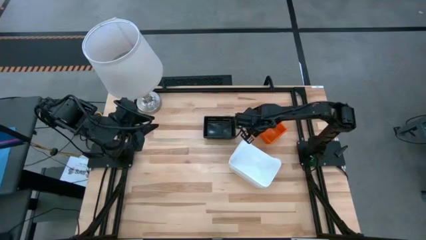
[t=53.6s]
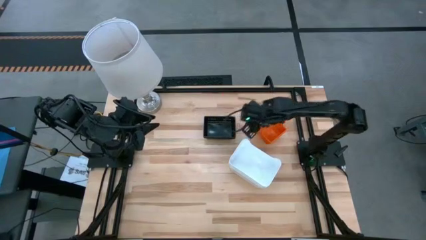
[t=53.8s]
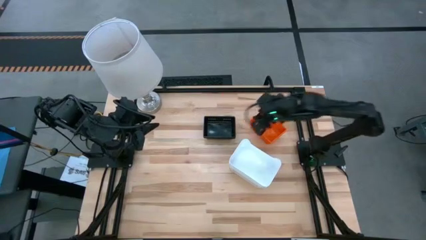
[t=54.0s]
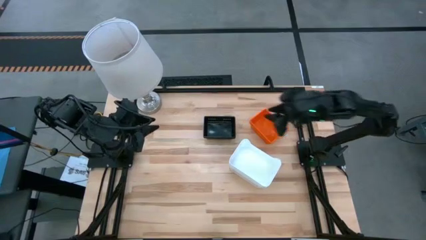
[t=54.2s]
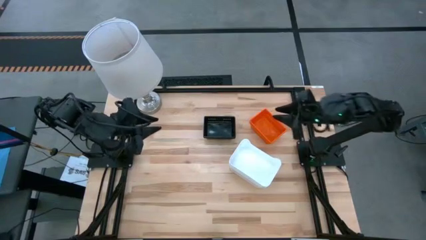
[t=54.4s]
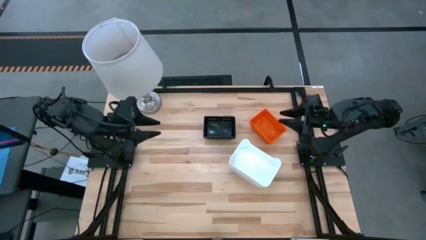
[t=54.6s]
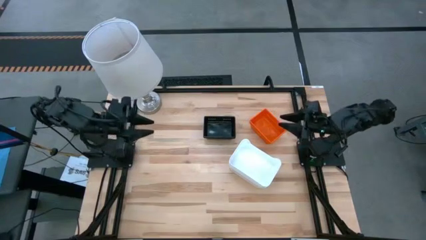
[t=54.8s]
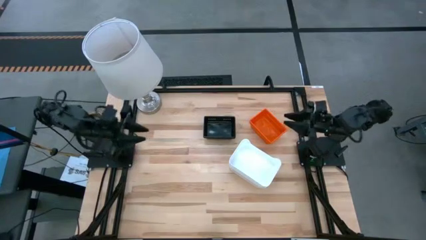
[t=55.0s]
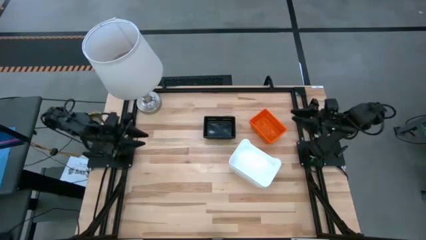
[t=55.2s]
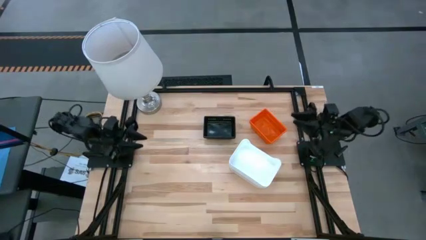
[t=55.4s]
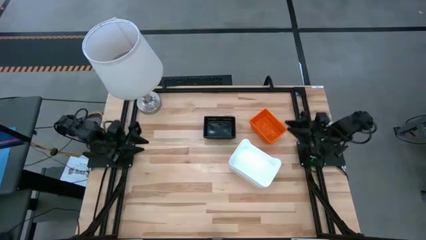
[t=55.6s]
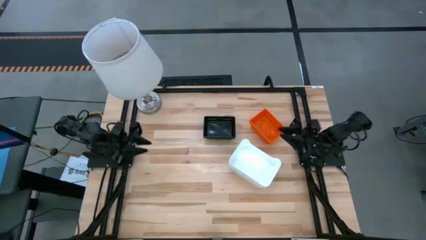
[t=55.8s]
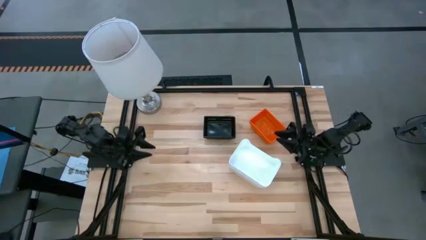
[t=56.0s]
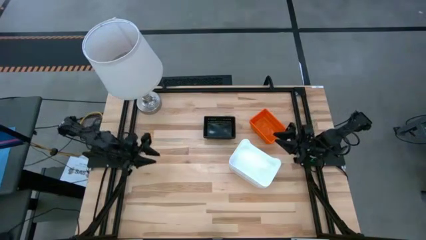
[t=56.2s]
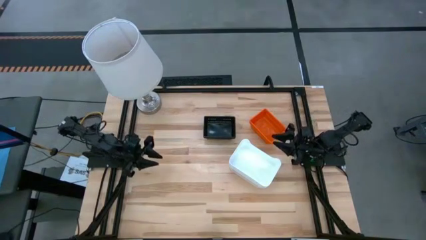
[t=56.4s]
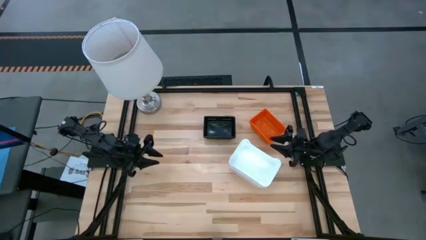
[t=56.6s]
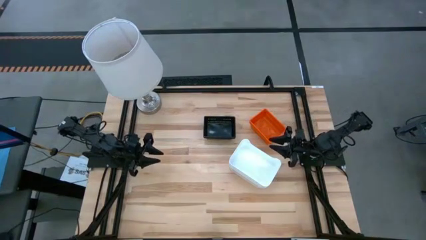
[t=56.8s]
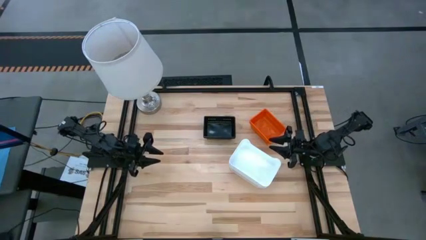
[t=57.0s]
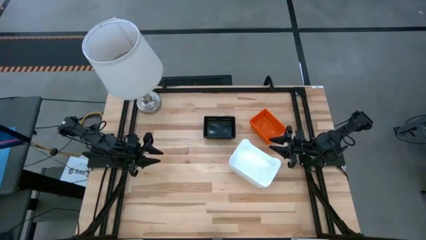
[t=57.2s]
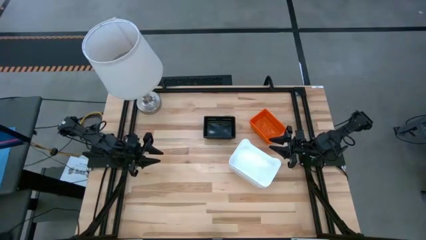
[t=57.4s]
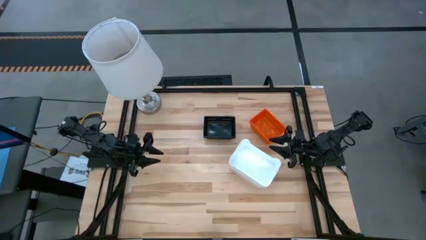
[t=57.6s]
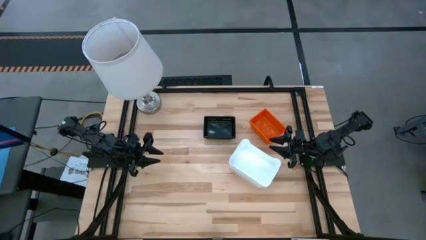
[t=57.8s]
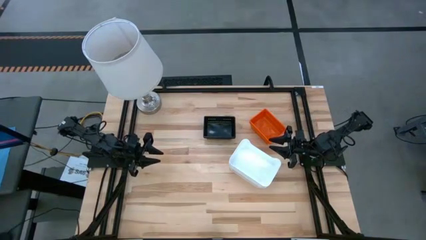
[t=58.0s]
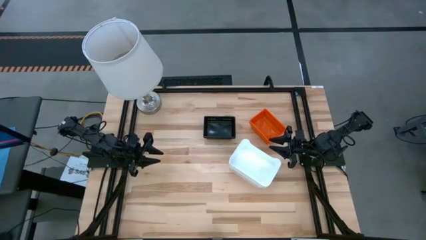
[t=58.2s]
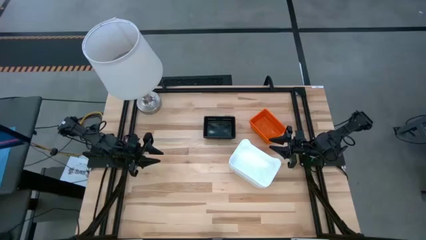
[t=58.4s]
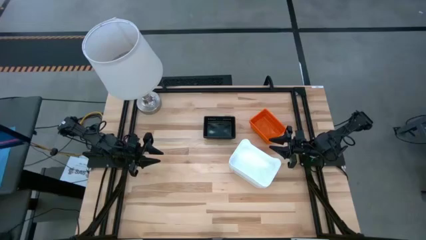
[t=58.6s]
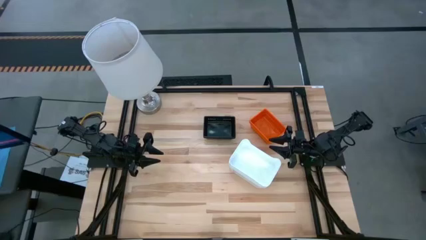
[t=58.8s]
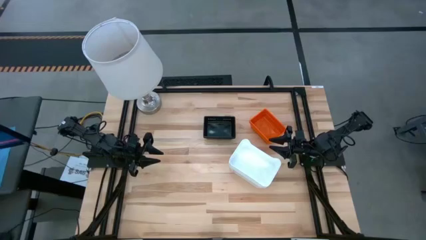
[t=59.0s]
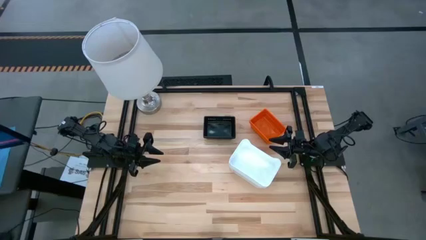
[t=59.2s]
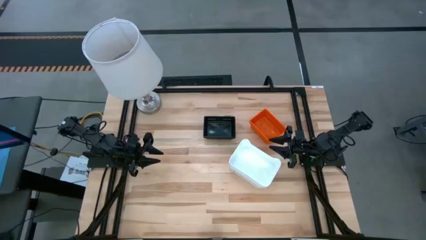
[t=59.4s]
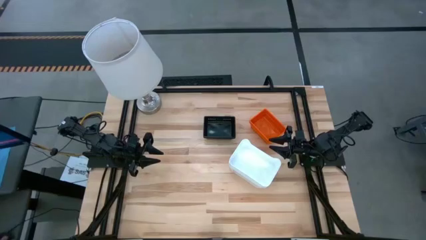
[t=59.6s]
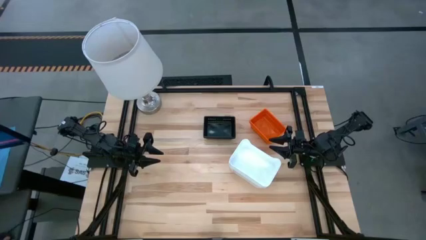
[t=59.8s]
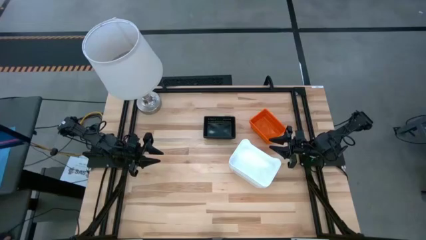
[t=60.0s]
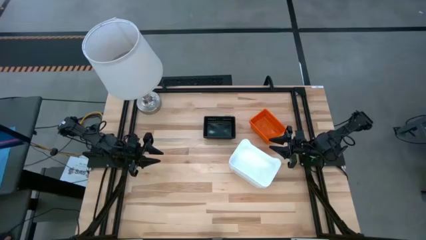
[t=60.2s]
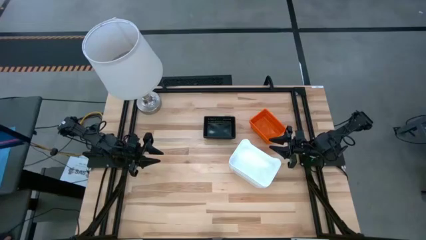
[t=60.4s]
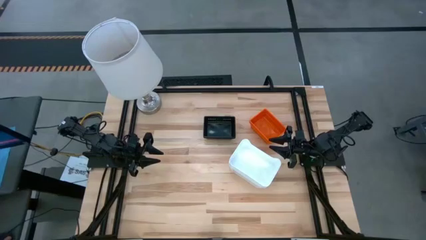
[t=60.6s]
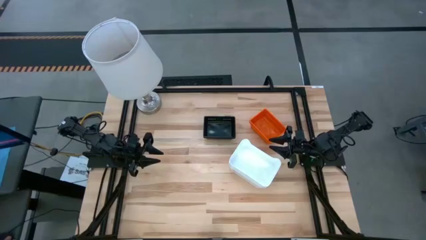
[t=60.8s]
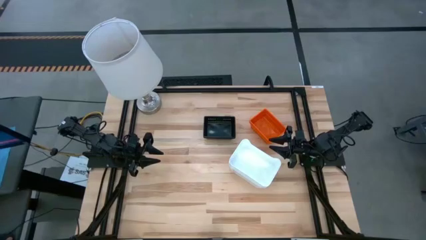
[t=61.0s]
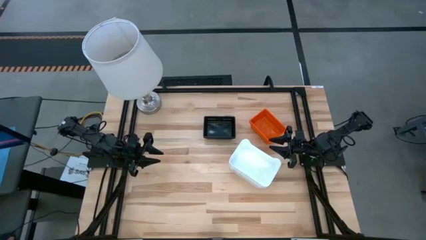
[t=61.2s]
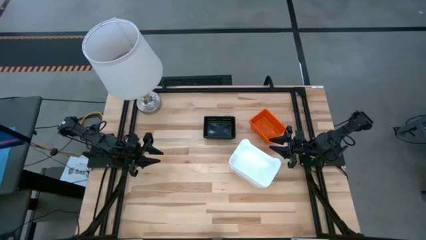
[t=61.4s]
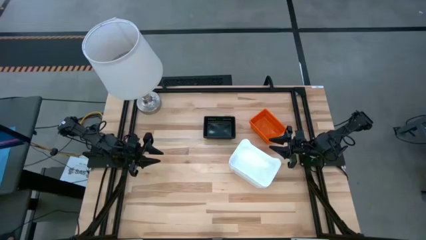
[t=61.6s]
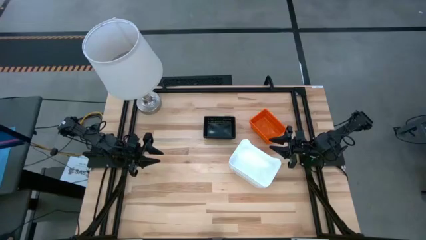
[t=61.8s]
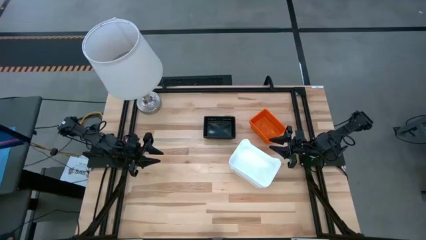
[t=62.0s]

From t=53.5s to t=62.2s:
Return to Home Position
